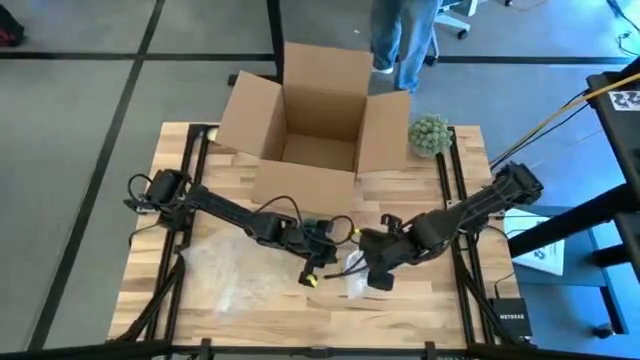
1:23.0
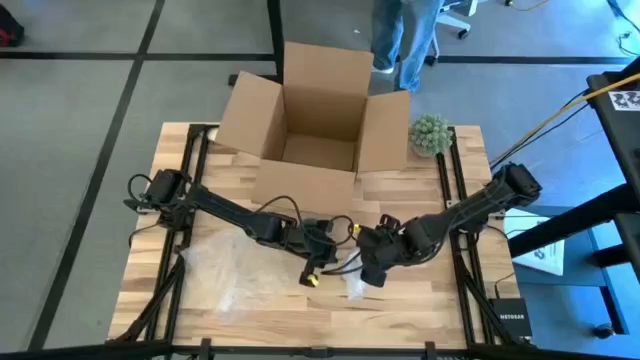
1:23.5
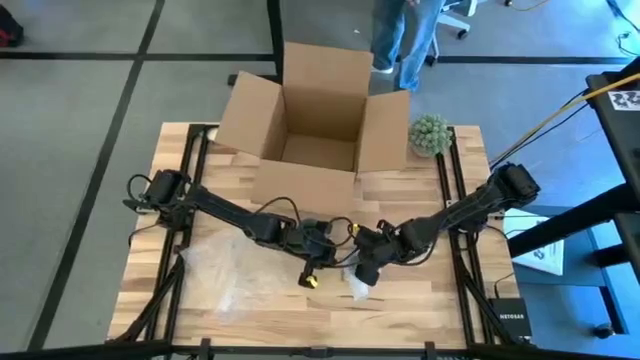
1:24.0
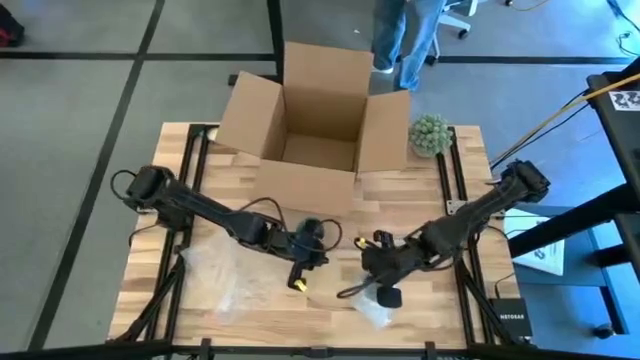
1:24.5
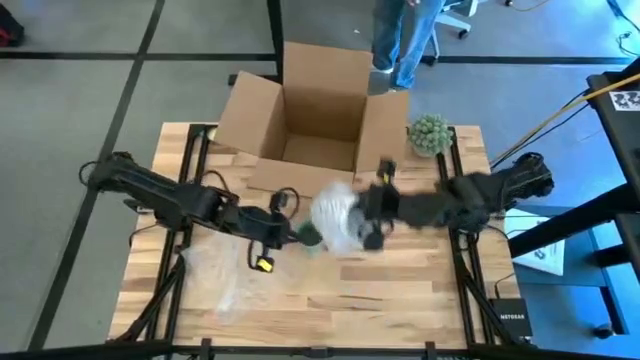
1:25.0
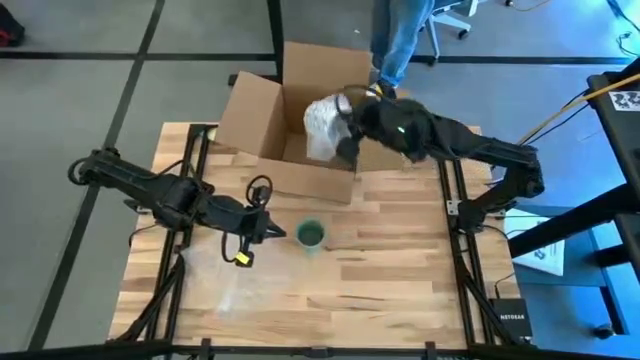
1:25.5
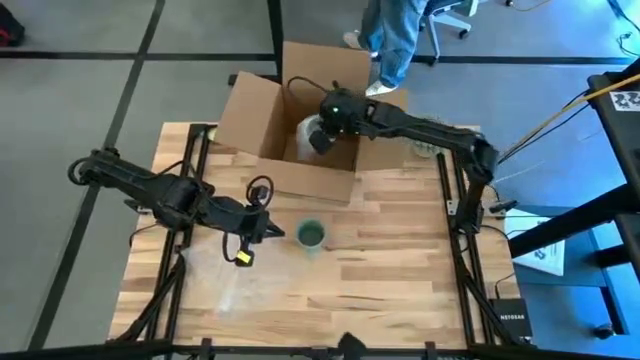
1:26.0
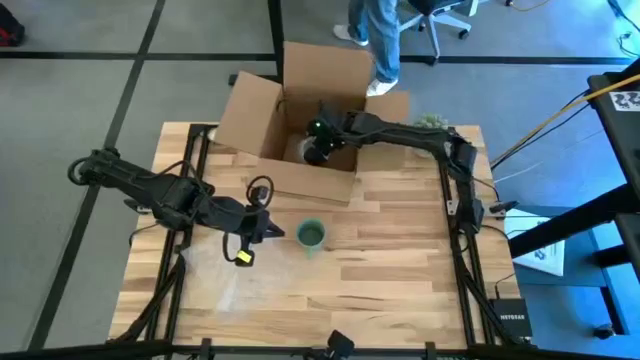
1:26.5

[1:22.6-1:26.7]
Task: wrap mug
Put the white mug into the brown box

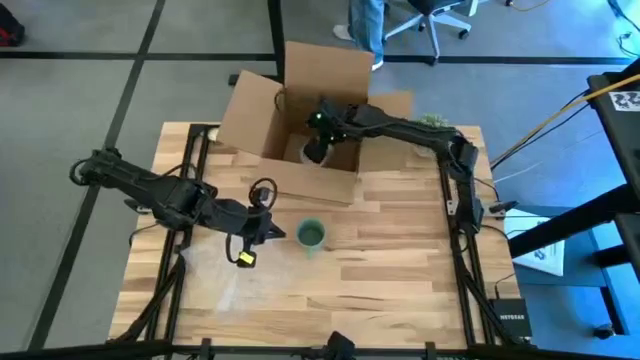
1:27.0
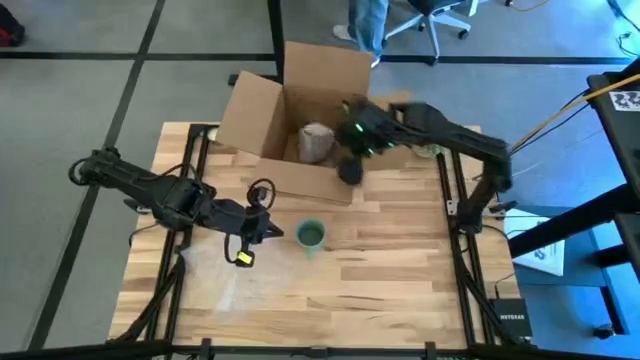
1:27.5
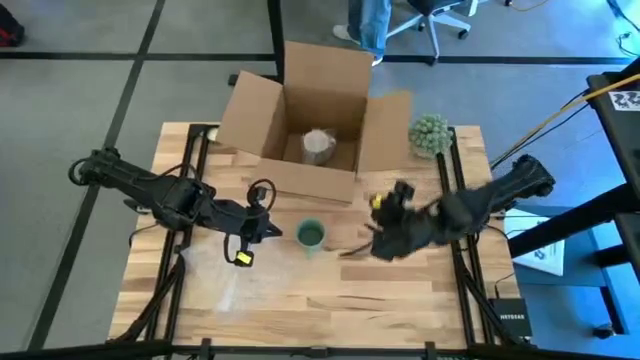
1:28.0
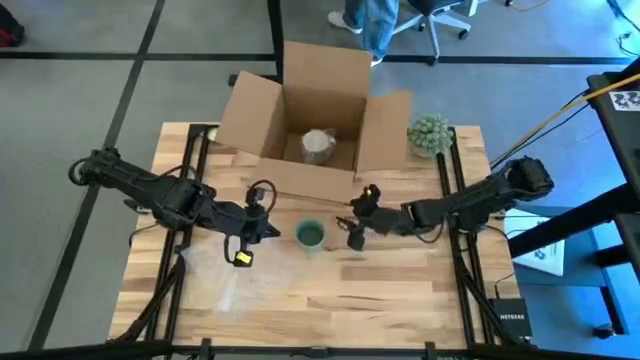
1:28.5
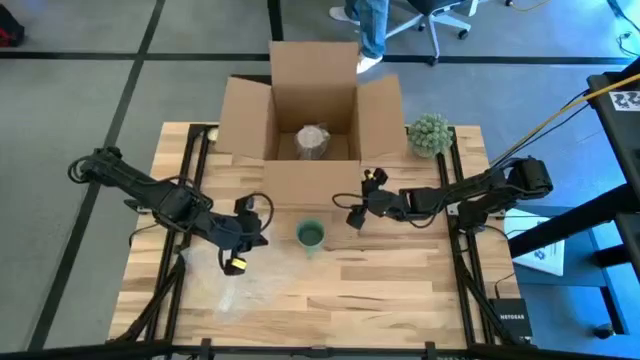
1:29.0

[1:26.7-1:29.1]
Move the box to the top

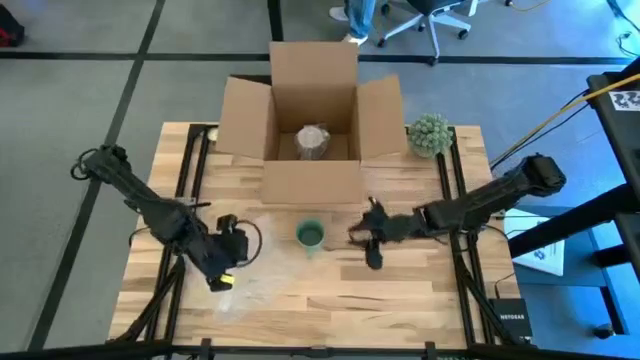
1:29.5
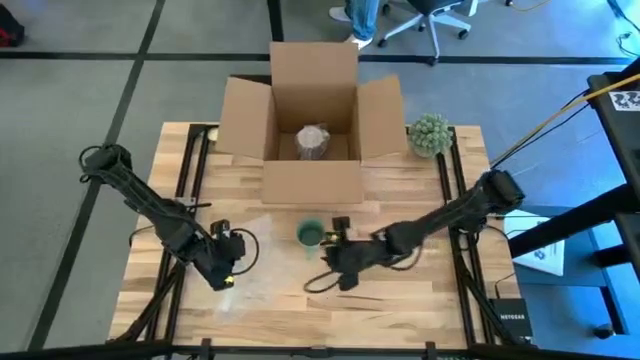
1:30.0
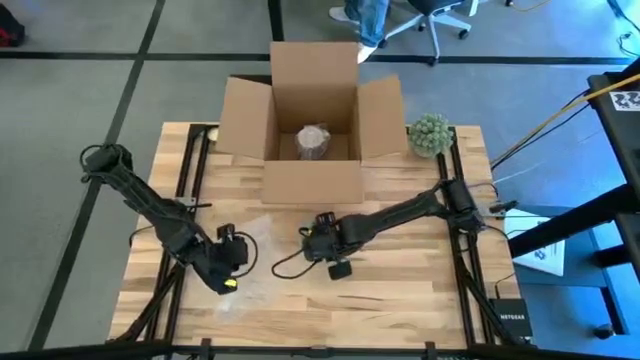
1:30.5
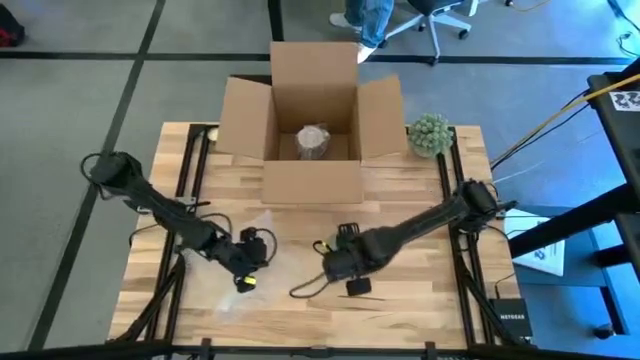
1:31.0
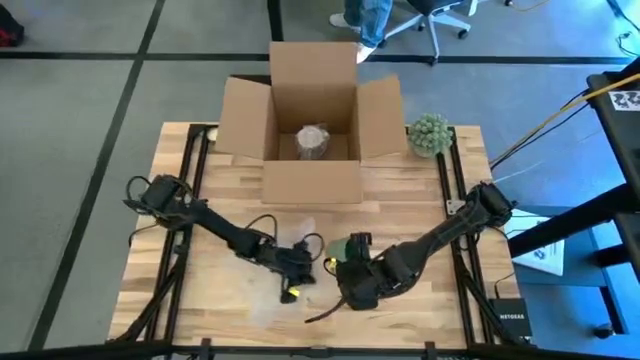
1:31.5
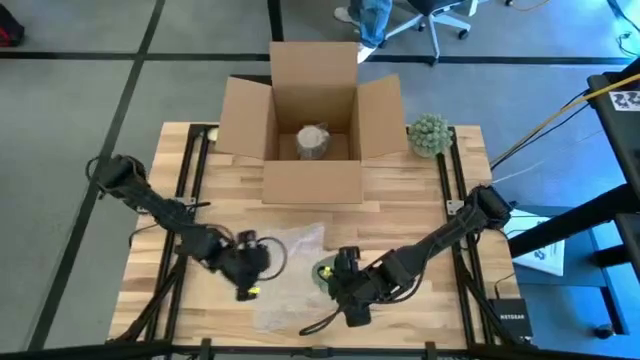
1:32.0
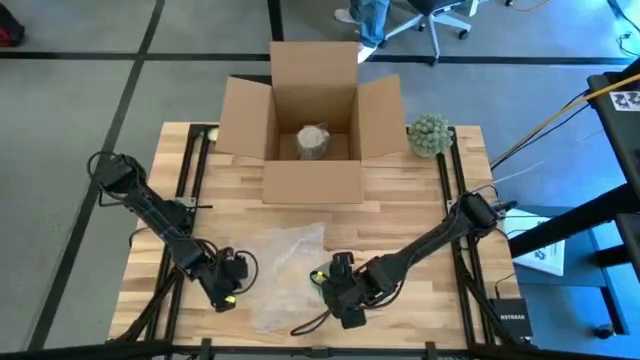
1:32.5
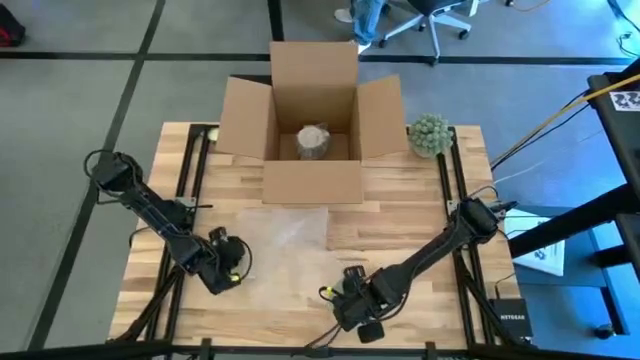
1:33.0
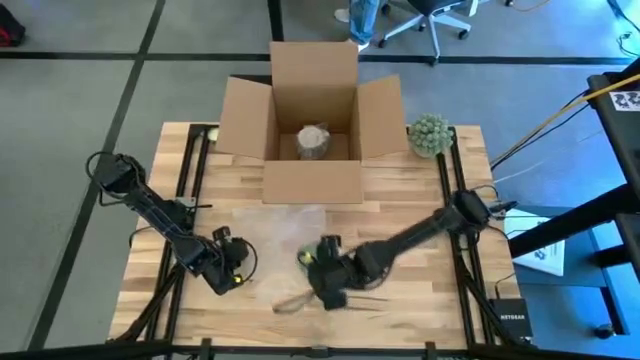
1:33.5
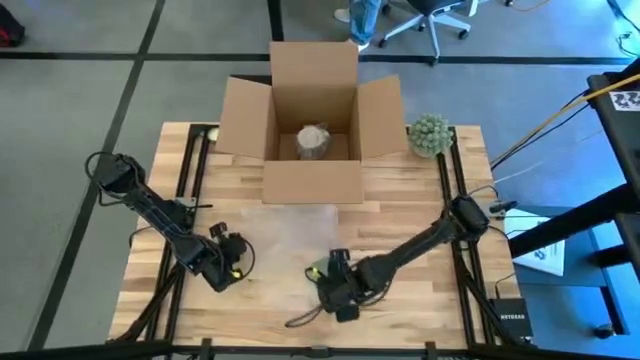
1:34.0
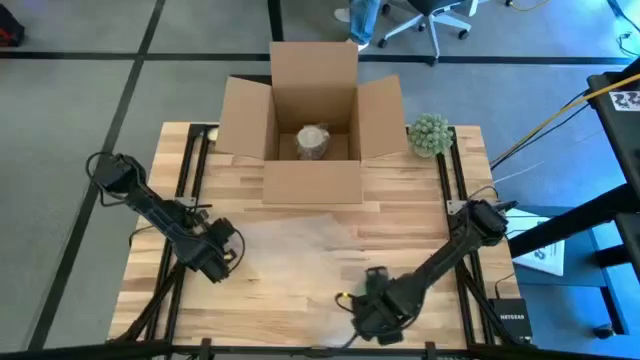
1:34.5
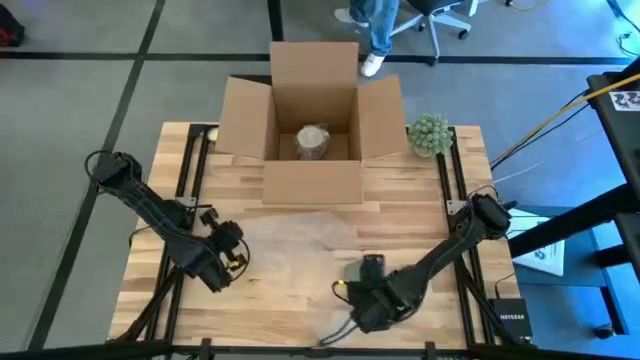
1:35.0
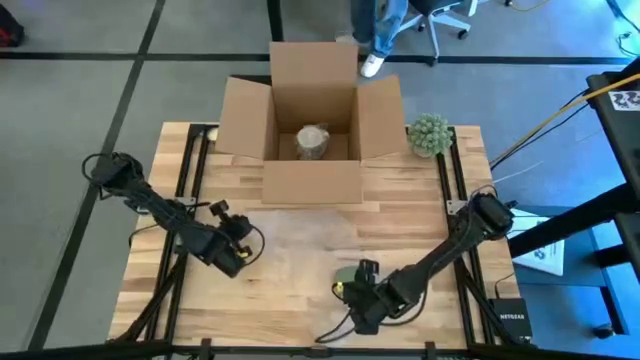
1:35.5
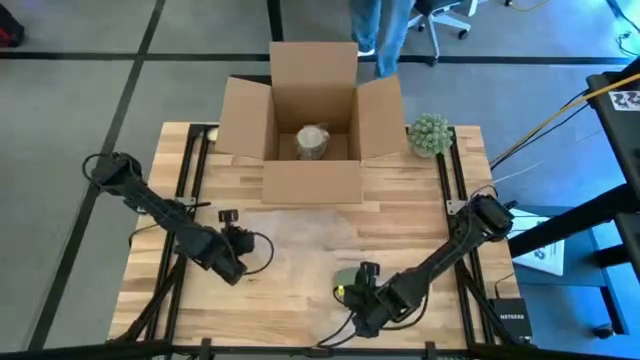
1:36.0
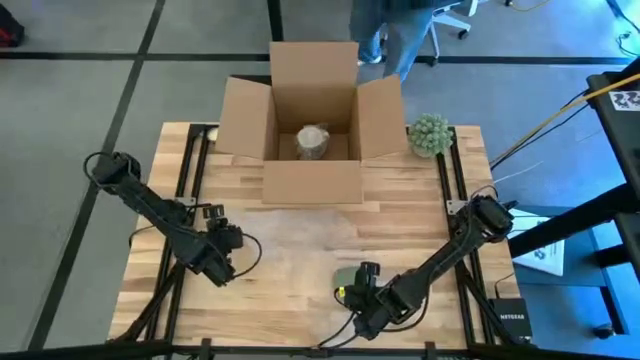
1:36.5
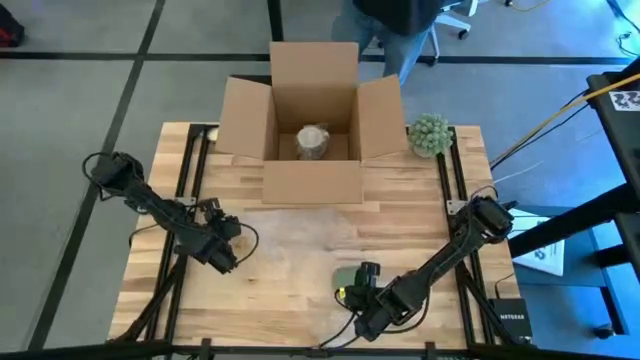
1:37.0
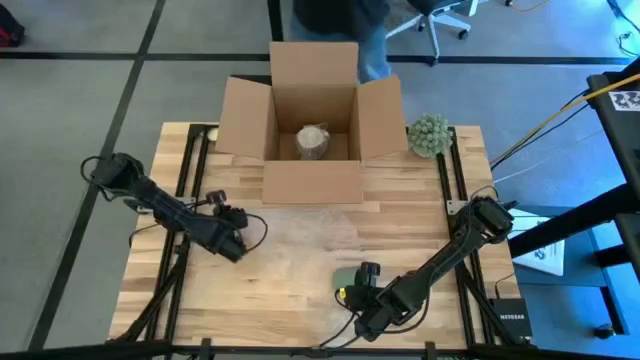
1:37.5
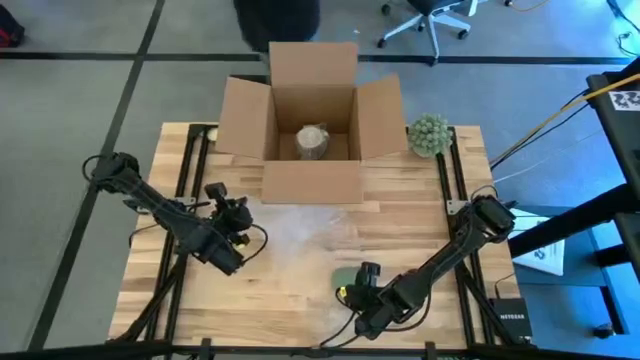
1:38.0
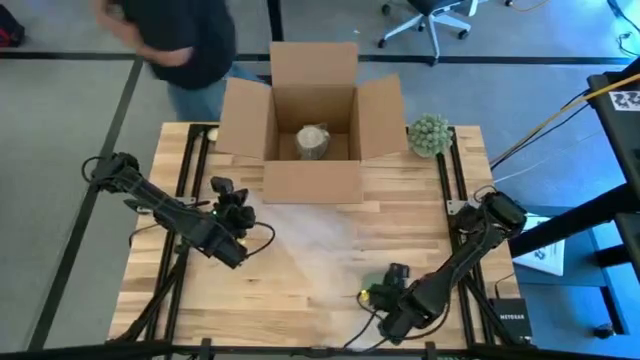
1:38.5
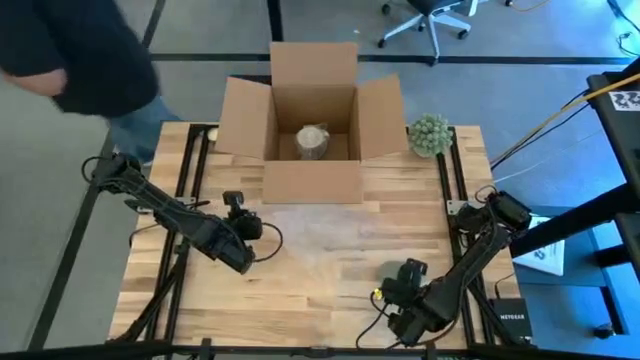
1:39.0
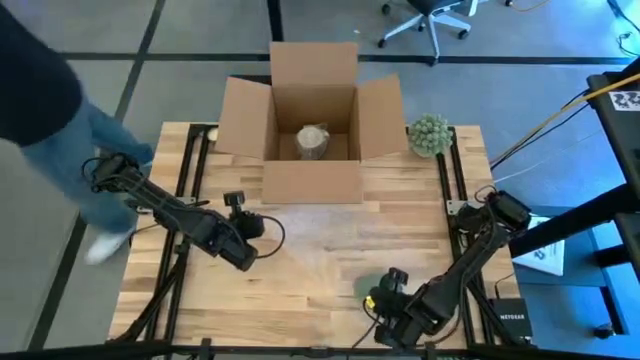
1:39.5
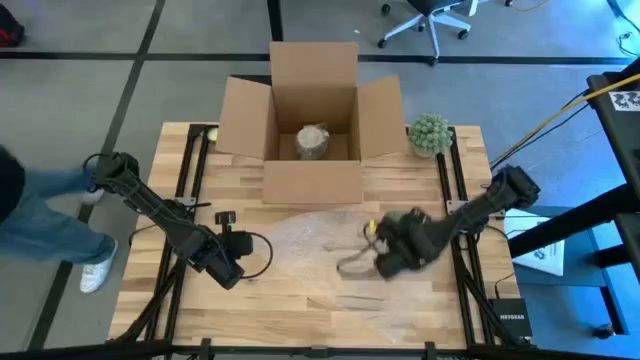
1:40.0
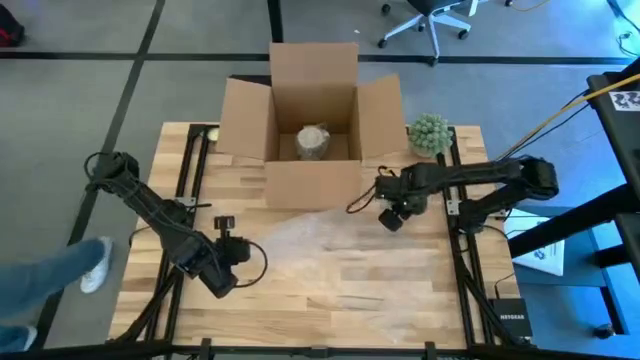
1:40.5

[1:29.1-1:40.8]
Wrap the dark green mug using the transparent bubble wrap

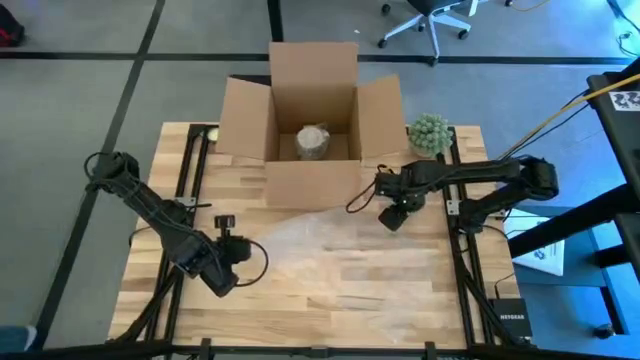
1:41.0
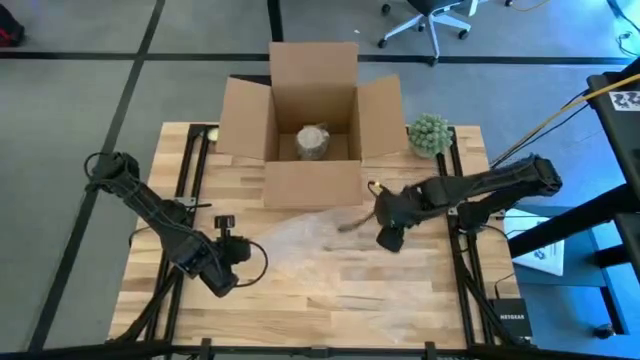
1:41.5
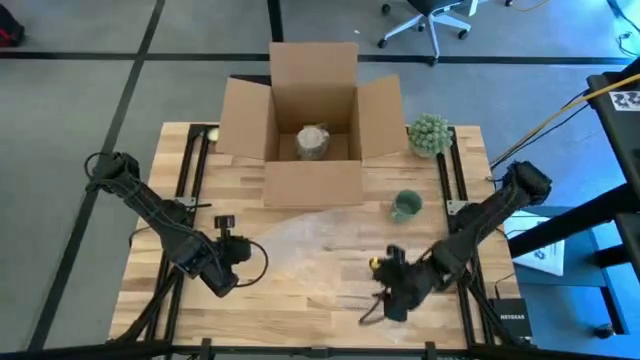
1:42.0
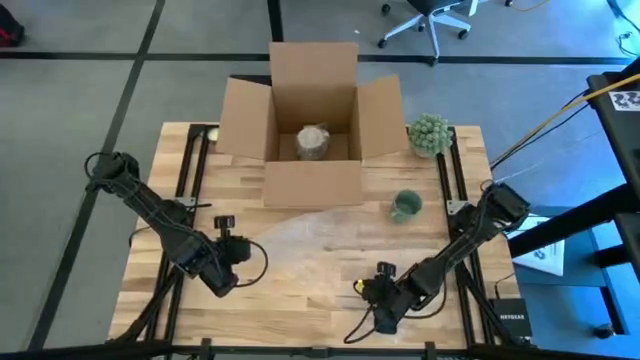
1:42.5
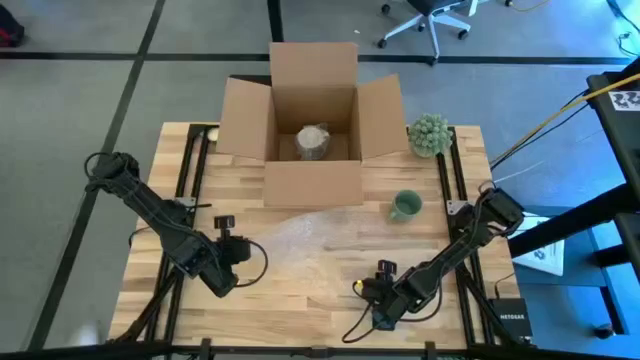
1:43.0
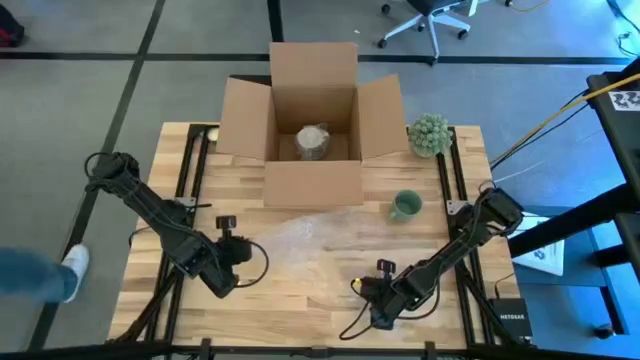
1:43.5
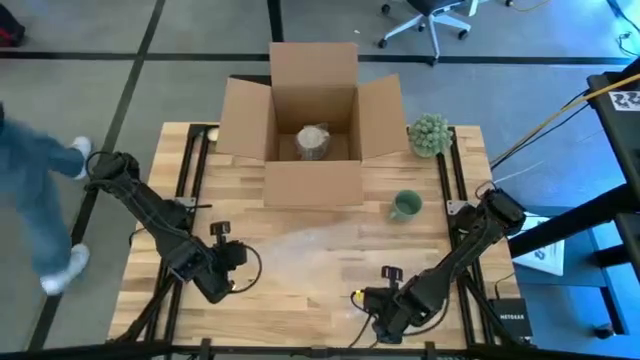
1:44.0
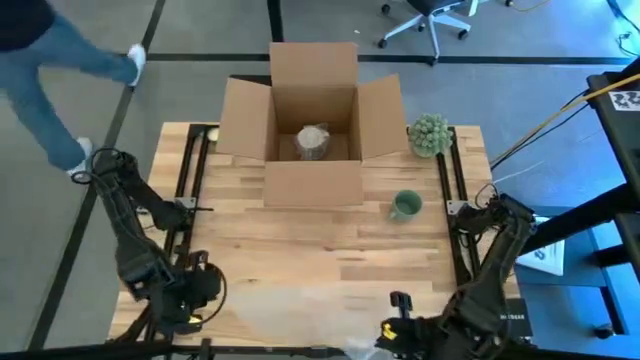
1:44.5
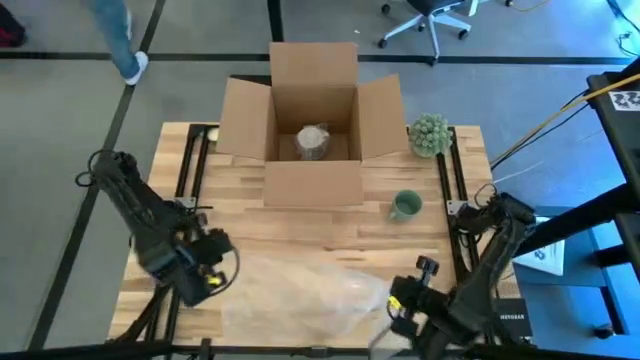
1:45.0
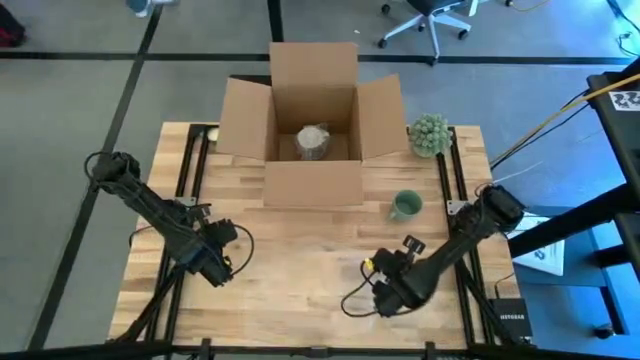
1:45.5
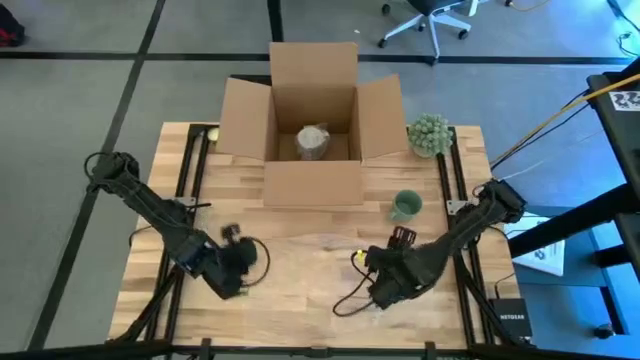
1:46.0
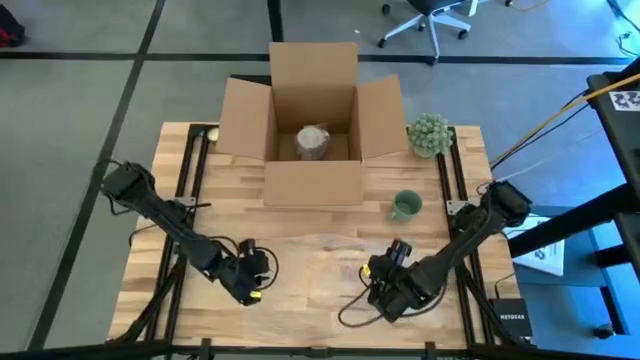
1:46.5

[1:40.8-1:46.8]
Prepare the transparent bubble wrap
